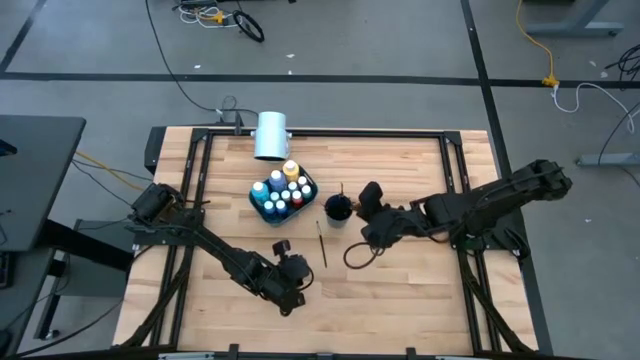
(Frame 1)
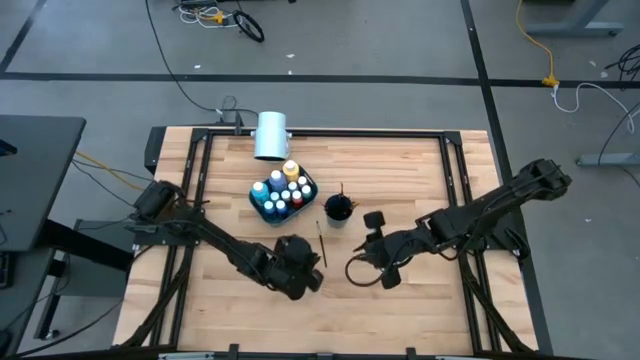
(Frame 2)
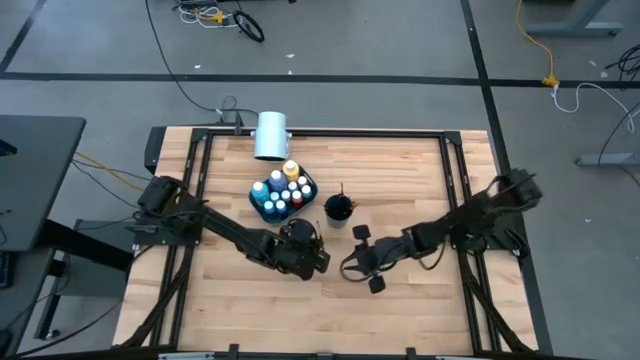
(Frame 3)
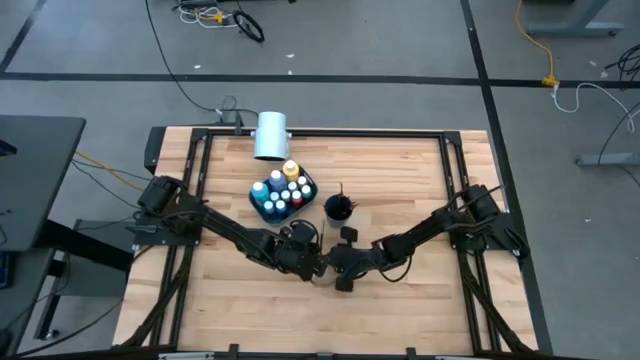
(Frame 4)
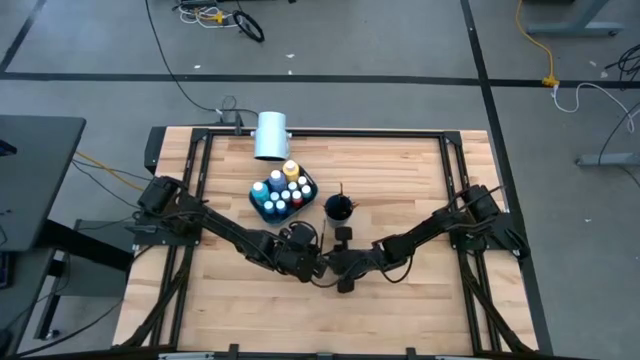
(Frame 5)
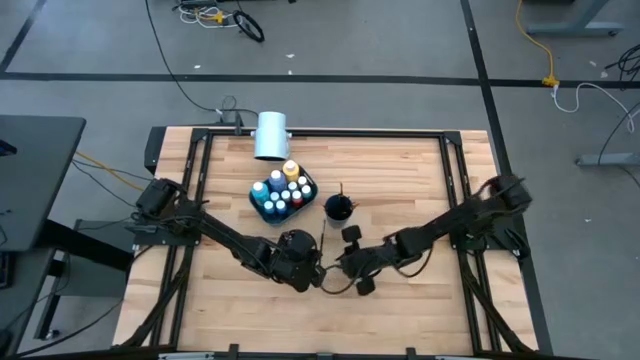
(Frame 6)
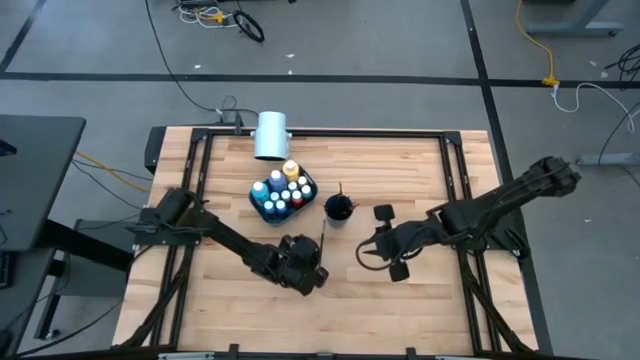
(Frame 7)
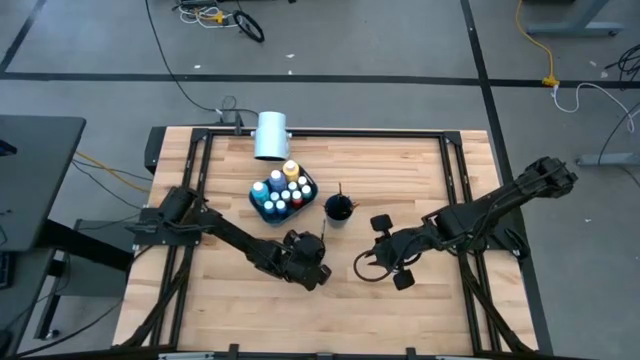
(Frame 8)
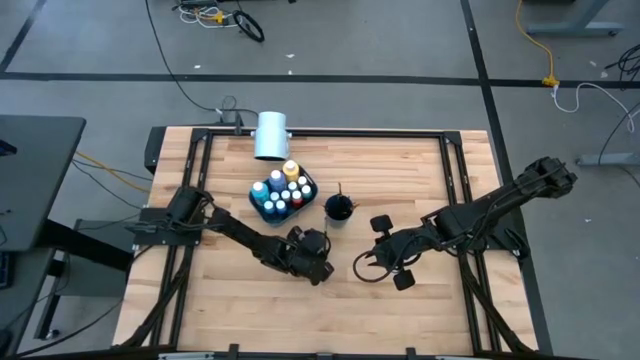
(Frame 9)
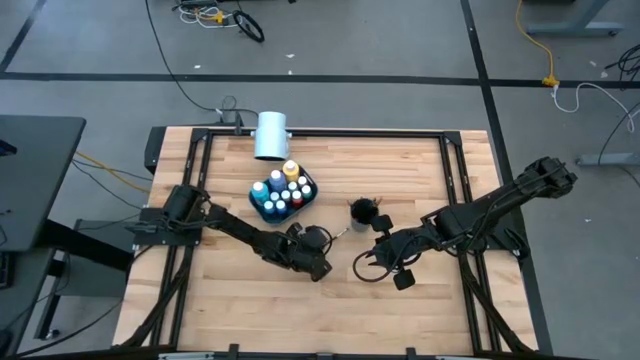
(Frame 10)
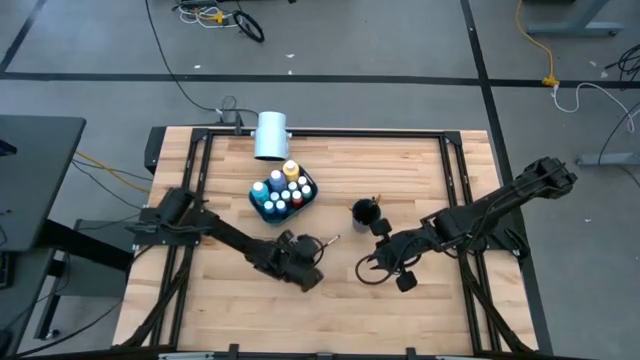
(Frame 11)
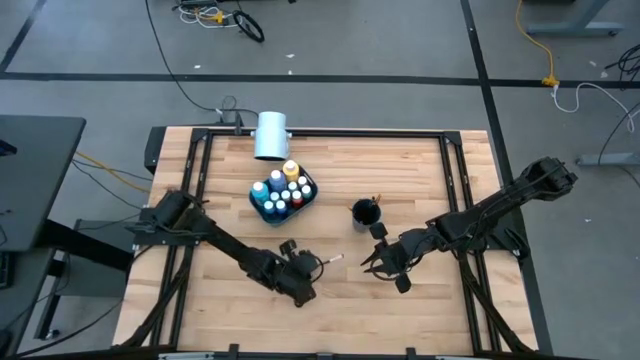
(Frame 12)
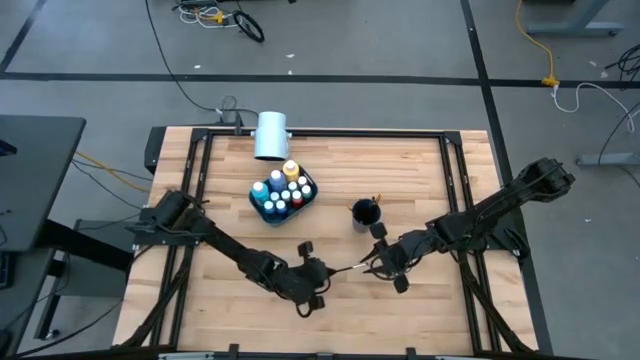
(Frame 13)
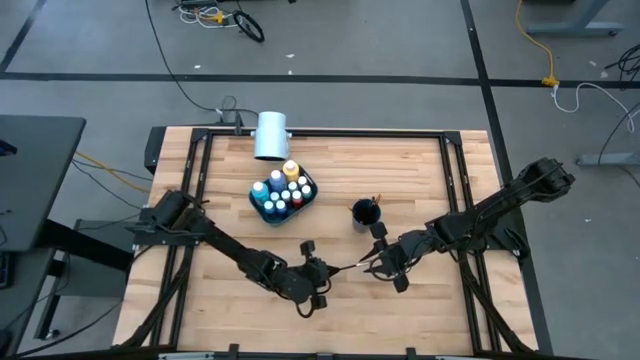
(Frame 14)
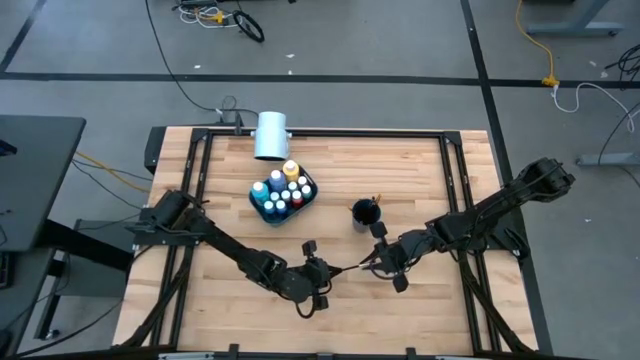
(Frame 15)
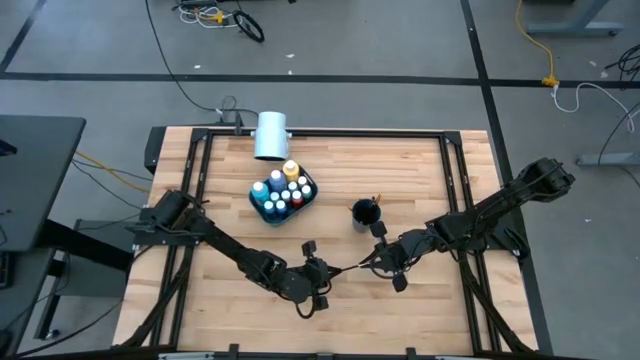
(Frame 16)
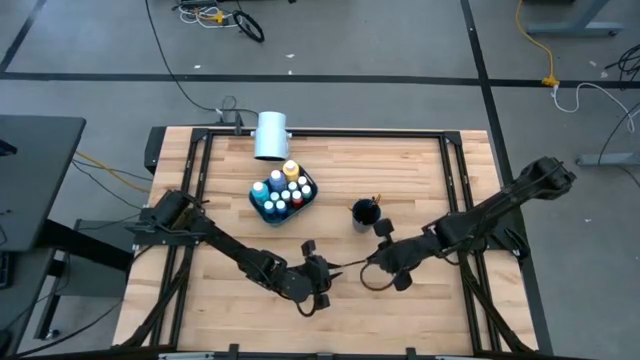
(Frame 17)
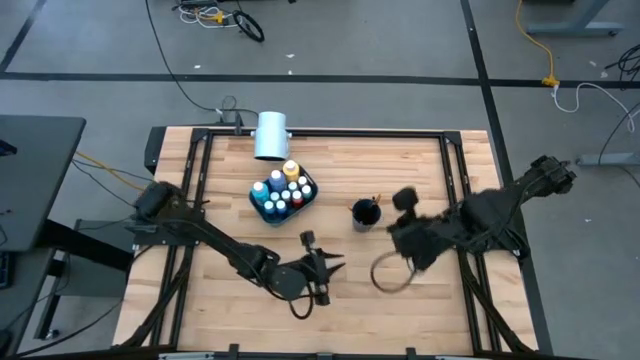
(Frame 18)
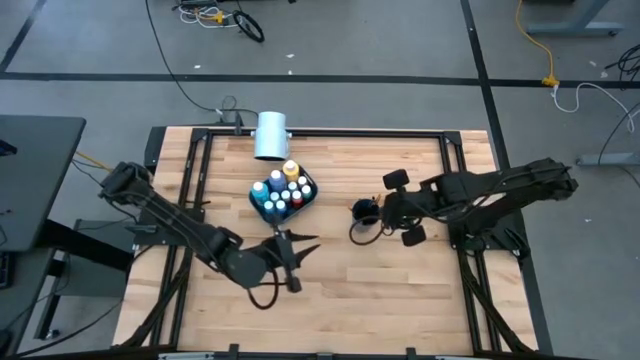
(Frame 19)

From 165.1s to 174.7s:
Task: Pick & Place Paint Supplies
Put the silver paint brush into the blue cup

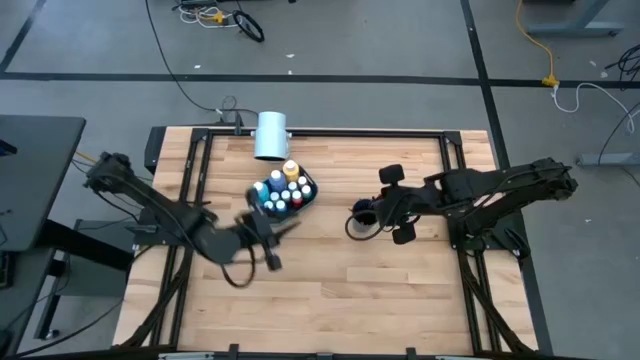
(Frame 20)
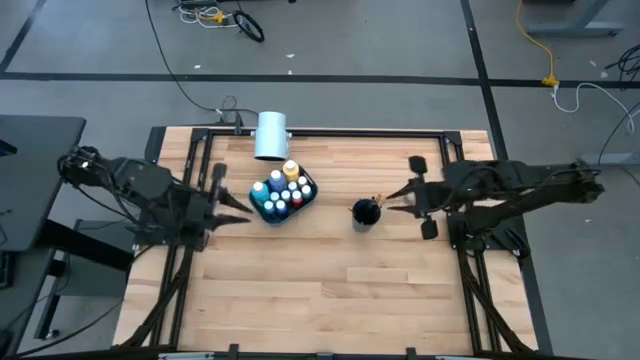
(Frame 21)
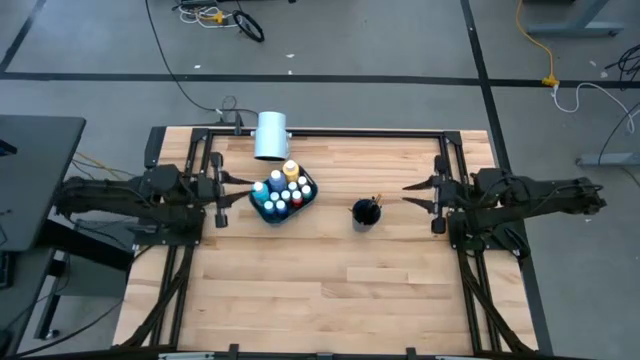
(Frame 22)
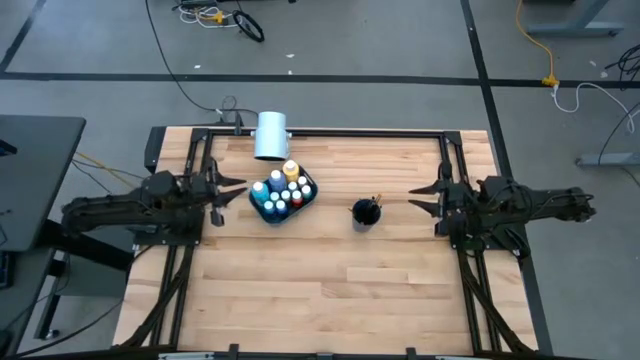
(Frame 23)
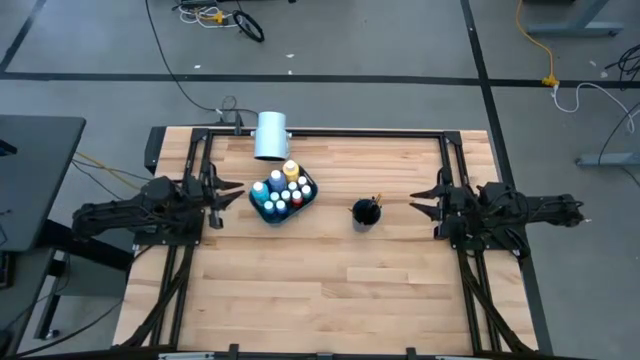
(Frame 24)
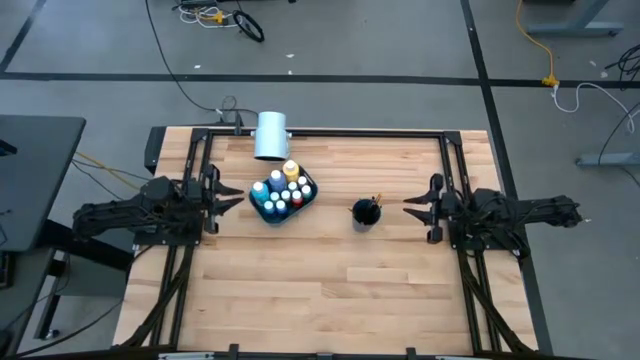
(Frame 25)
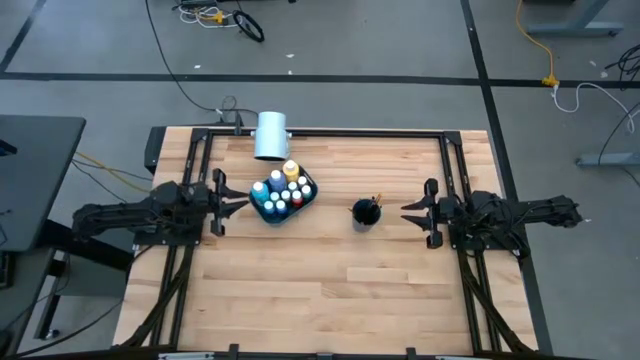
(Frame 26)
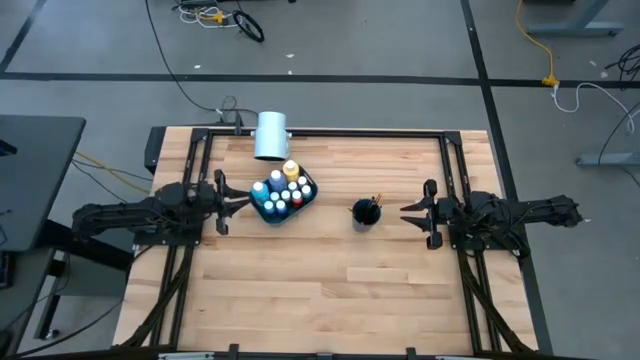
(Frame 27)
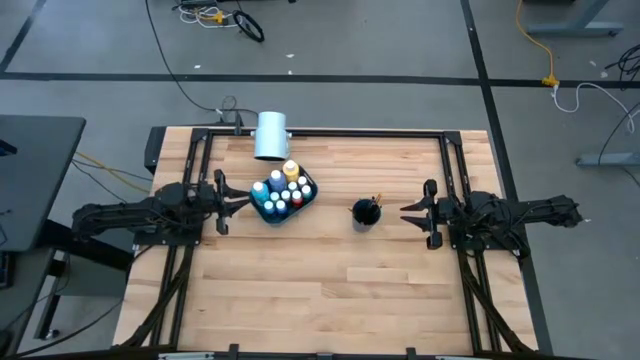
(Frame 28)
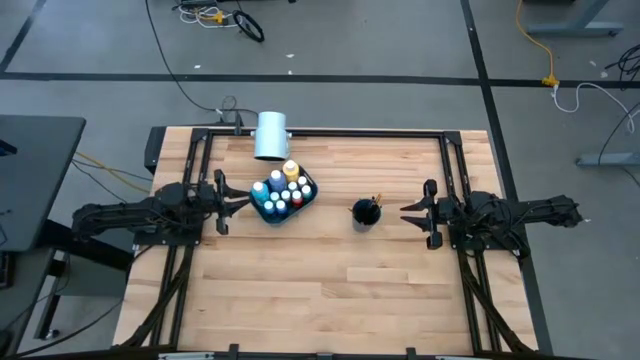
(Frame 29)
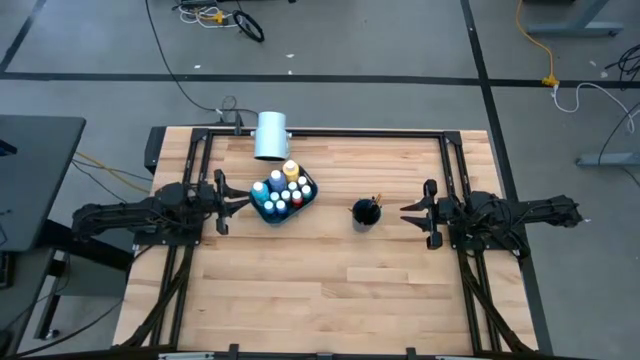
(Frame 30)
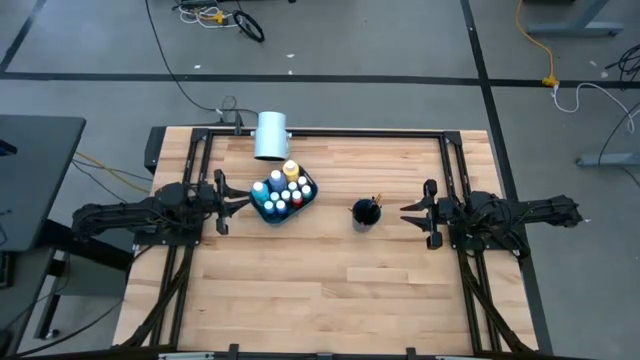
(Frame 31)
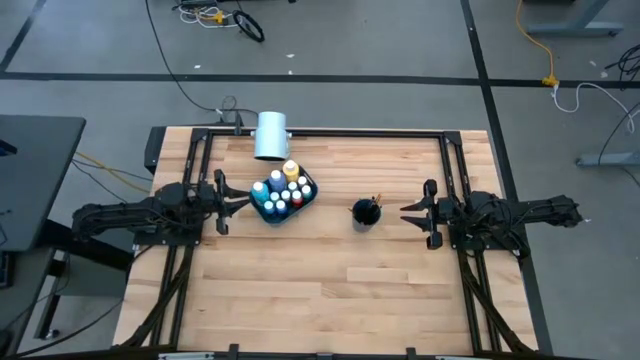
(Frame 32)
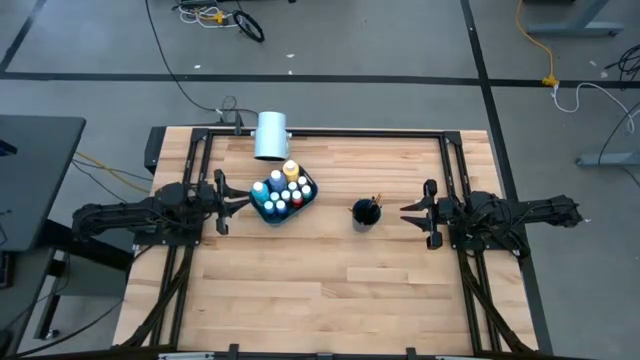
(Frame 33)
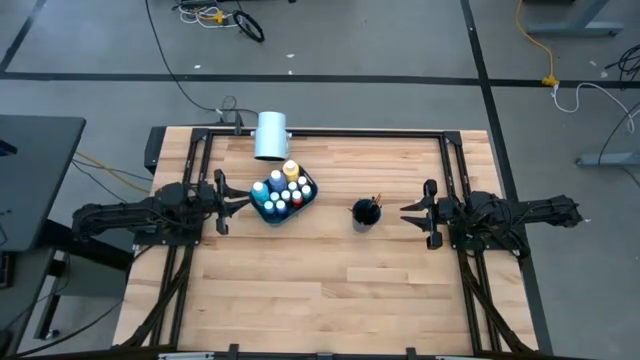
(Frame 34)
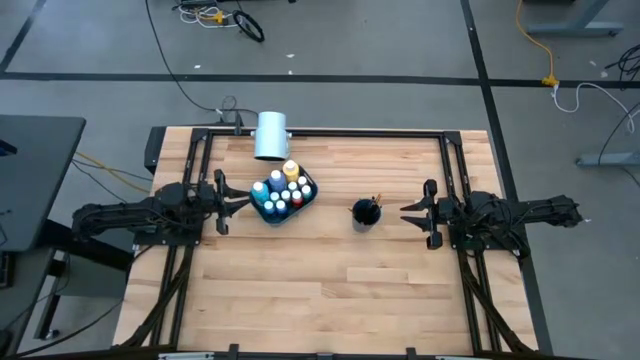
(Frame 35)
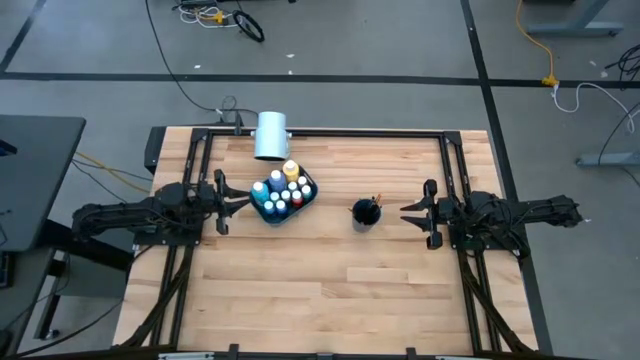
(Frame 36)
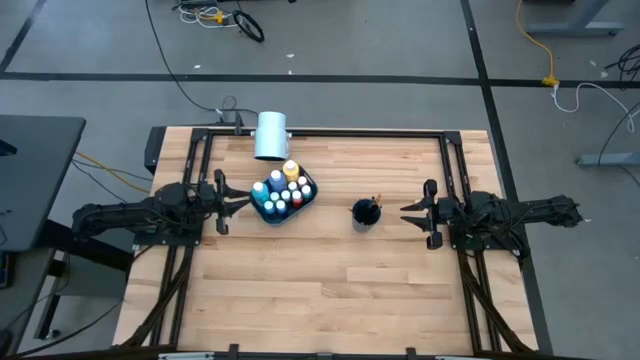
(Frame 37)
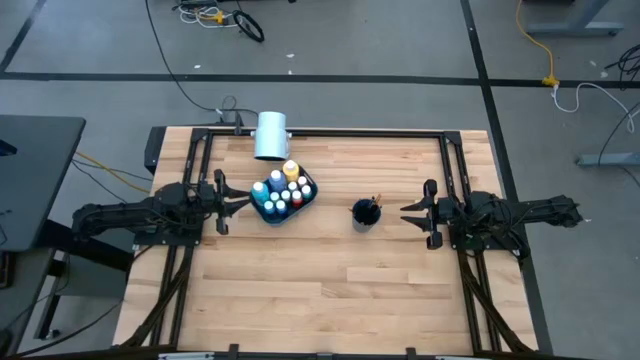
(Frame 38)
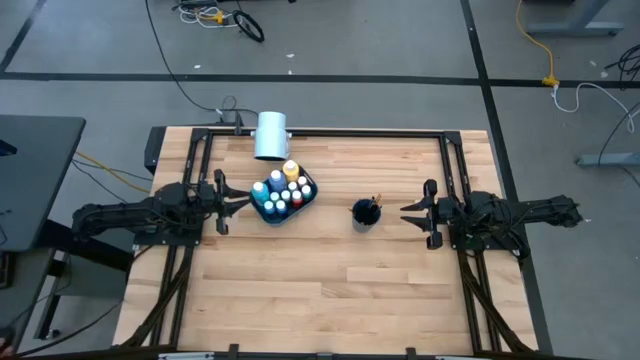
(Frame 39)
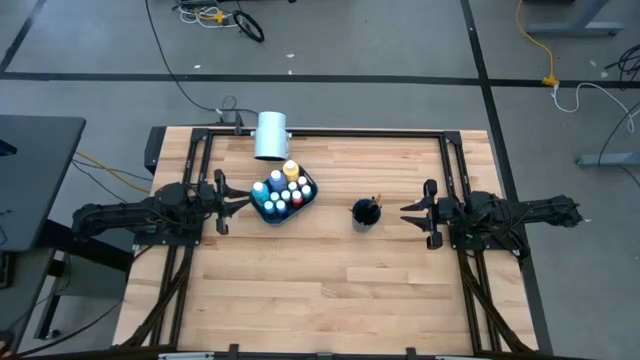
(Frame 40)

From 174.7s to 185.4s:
Return to Home Position

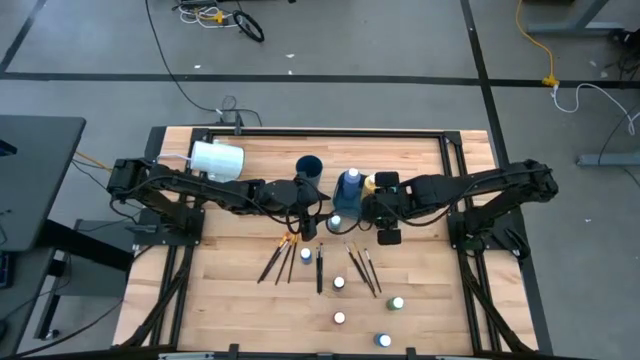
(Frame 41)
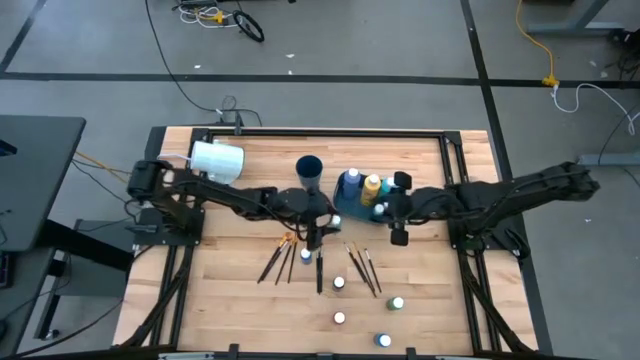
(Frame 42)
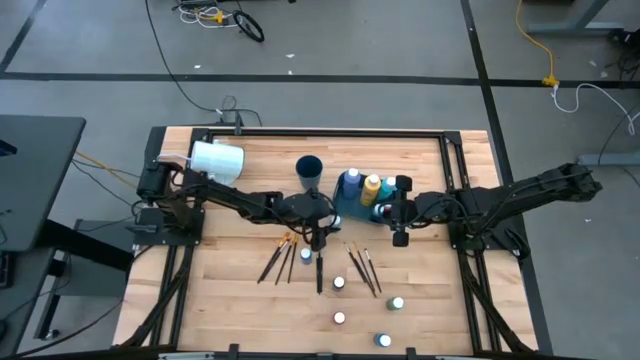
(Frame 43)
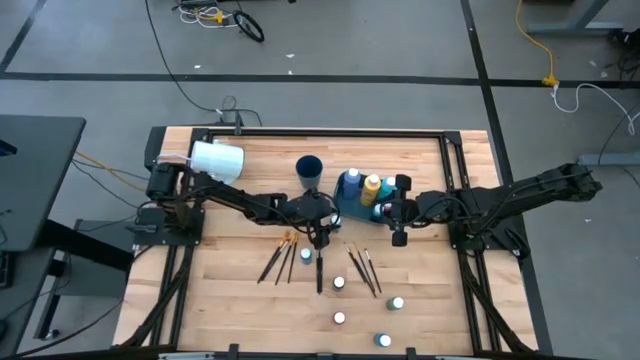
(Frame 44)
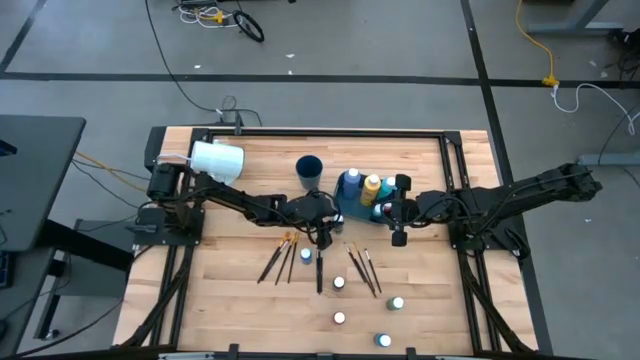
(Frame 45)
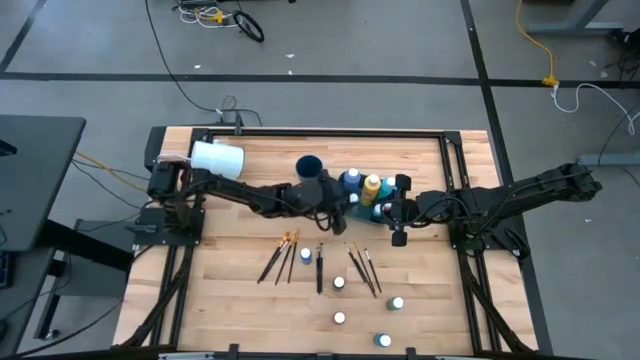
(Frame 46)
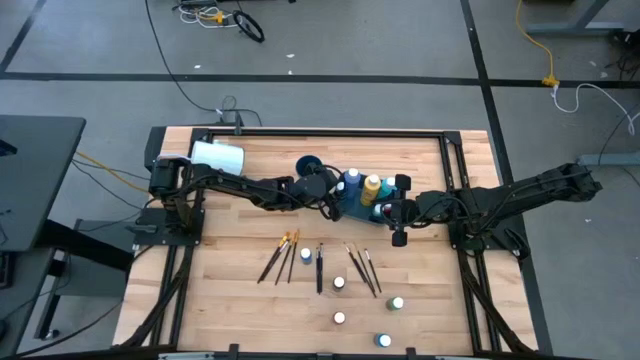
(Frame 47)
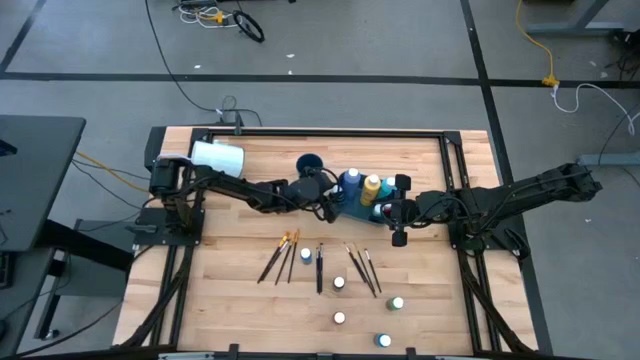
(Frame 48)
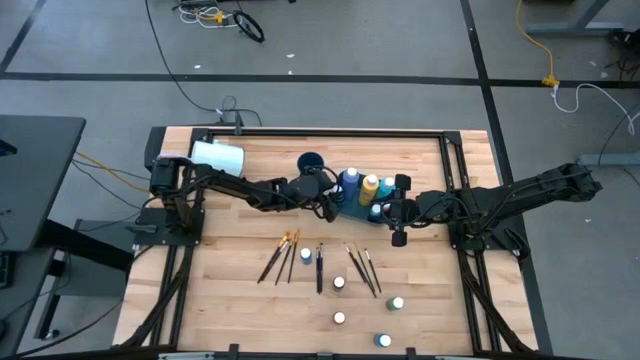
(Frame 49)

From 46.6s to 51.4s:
Task: Pick & Place Paint Supplies
Put the small light blue paint bottle into the blue bin
